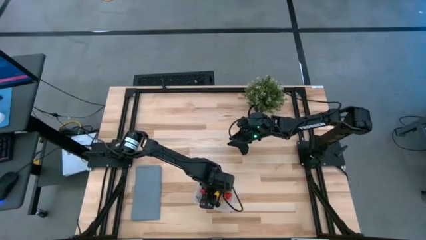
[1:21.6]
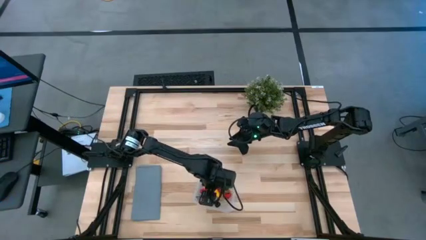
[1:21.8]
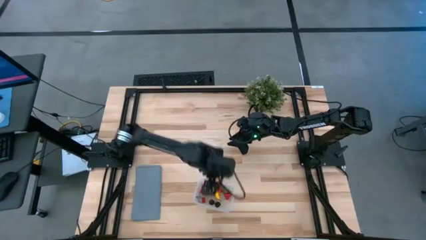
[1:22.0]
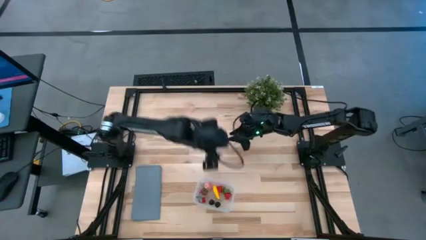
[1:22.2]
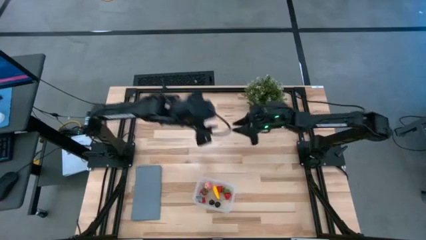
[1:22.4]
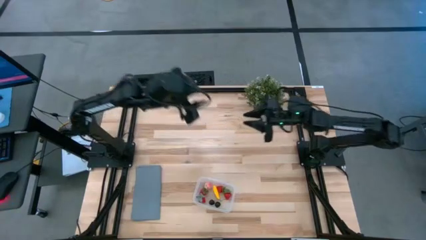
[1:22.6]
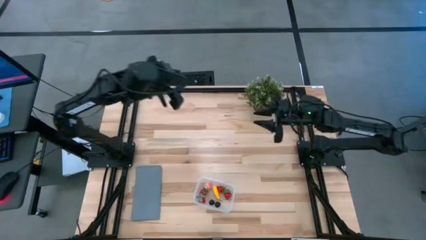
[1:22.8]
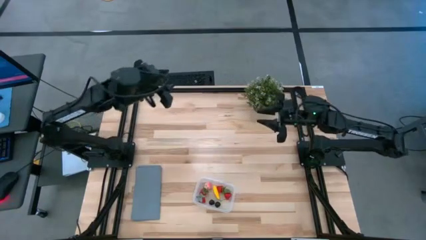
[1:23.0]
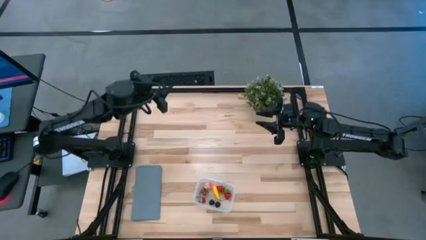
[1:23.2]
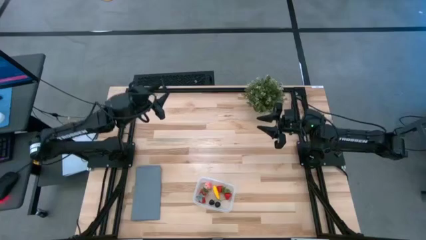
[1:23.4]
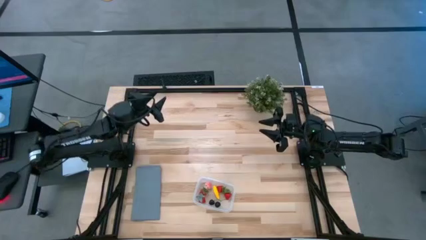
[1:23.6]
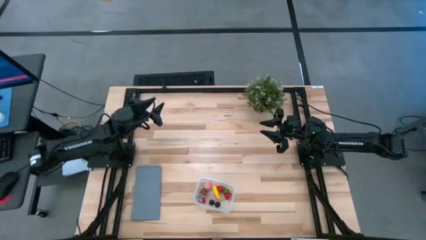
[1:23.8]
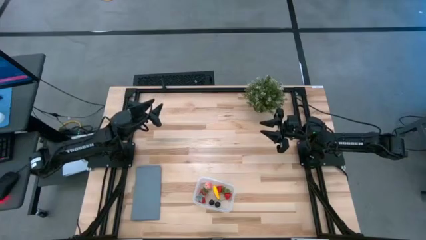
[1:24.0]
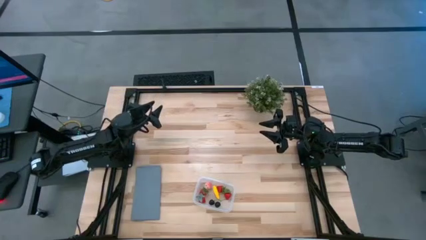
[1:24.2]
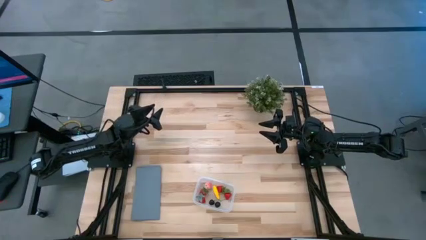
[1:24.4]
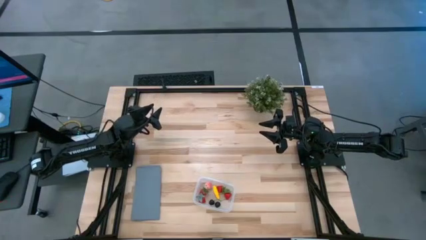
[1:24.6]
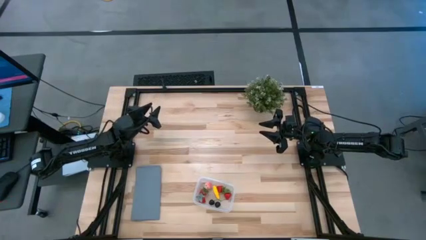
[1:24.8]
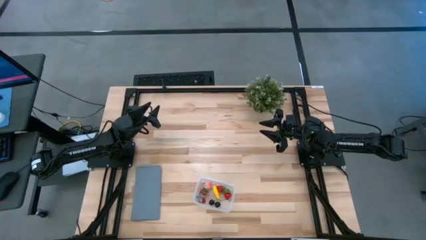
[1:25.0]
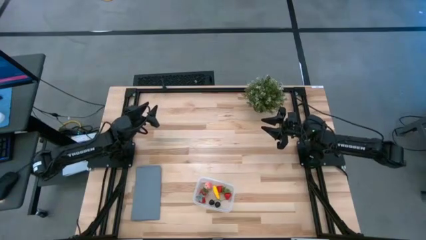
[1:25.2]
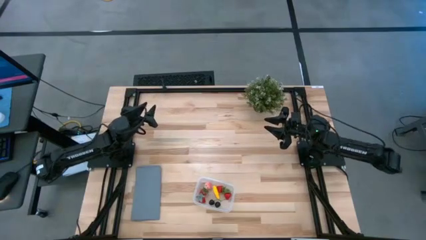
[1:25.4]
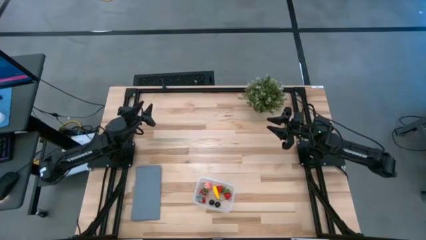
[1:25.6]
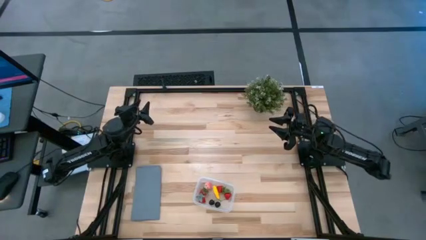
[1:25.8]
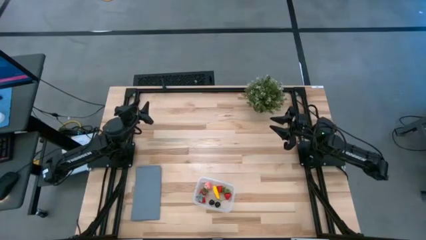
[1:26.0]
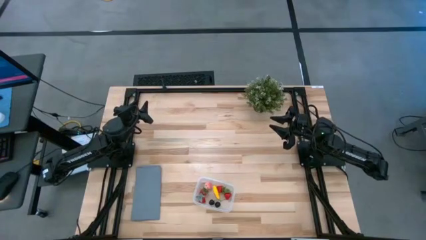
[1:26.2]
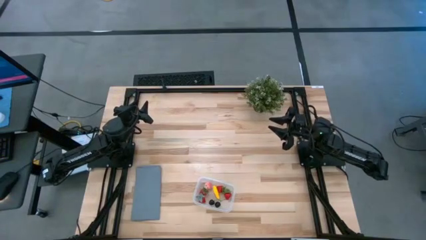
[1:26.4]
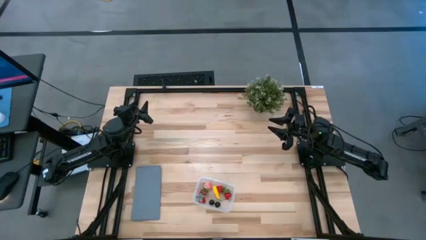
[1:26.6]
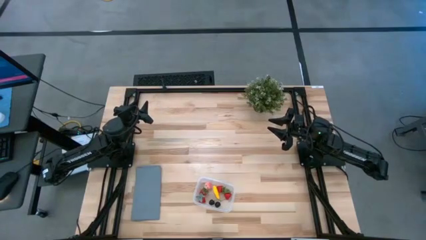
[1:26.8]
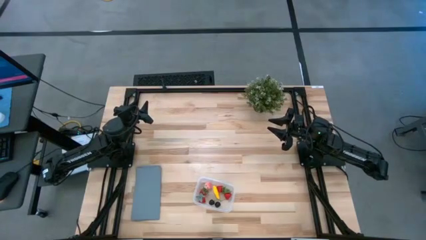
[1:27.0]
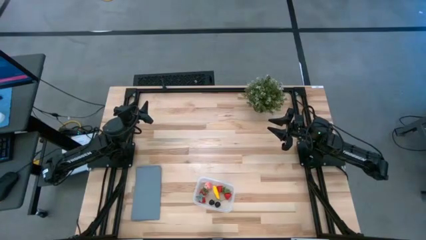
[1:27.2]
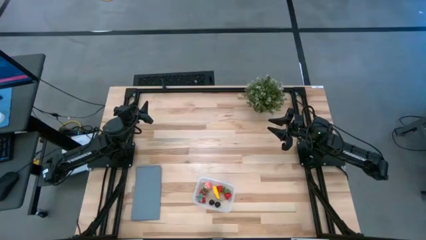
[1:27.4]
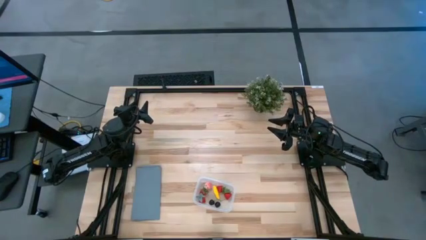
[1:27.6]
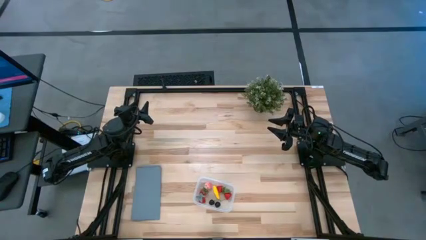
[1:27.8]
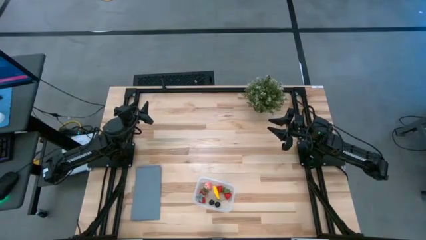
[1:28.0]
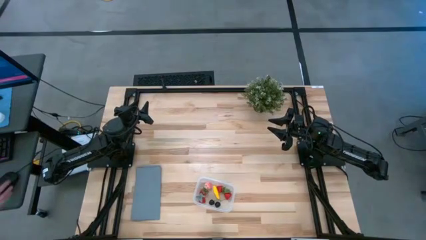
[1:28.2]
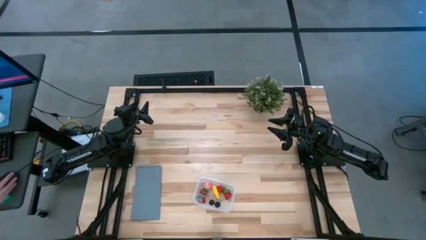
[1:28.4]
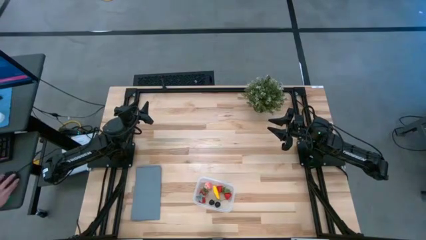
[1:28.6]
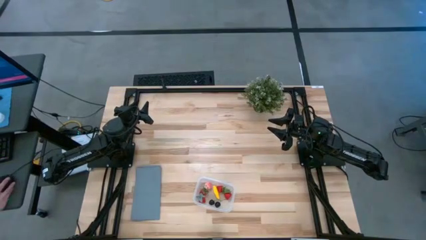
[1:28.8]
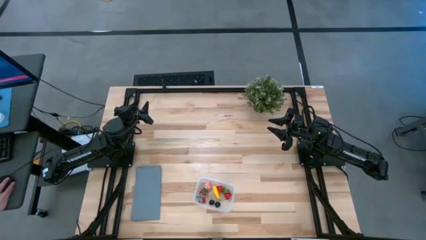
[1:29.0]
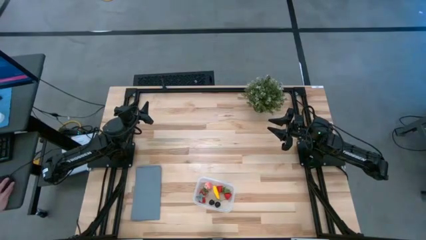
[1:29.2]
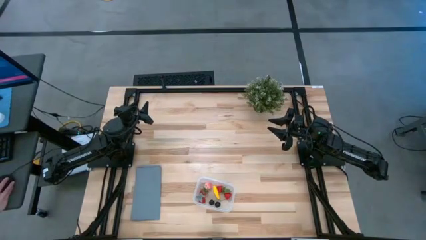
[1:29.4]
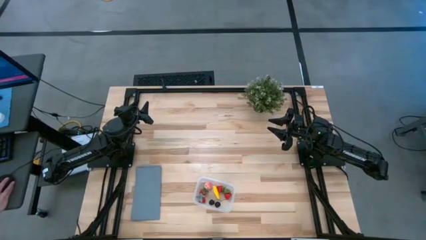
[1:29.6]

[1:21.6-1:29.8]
Task: Pick and placing Produce into tupperware
Return to Home Position

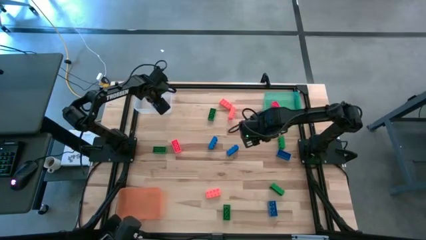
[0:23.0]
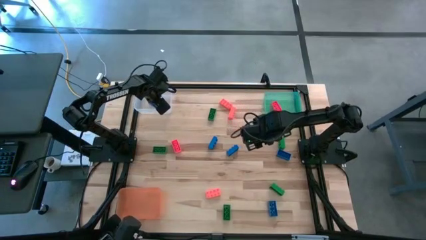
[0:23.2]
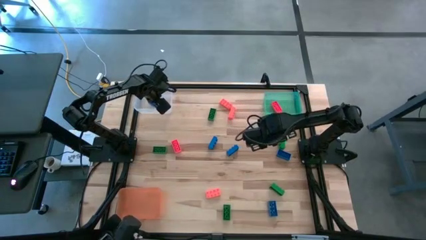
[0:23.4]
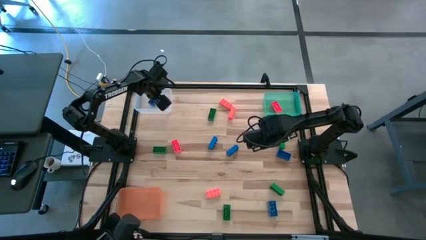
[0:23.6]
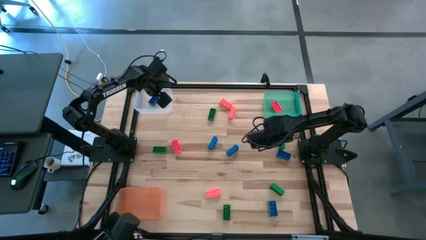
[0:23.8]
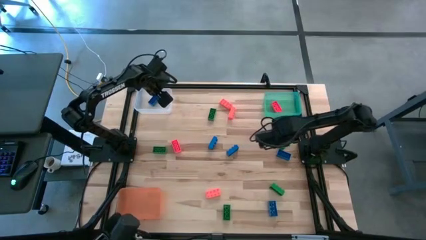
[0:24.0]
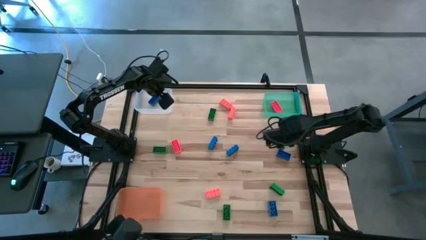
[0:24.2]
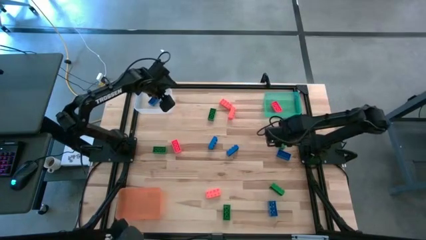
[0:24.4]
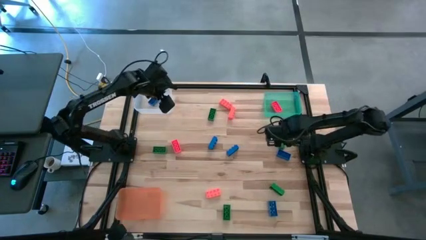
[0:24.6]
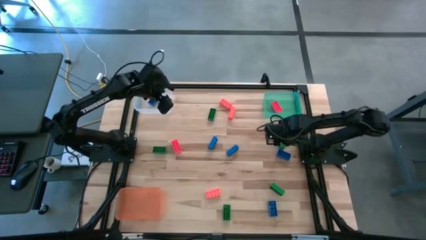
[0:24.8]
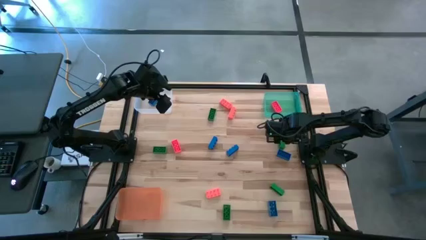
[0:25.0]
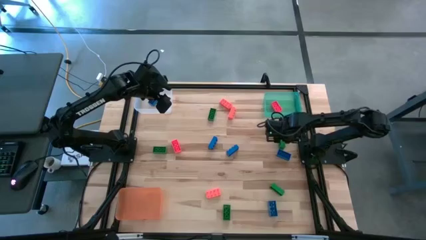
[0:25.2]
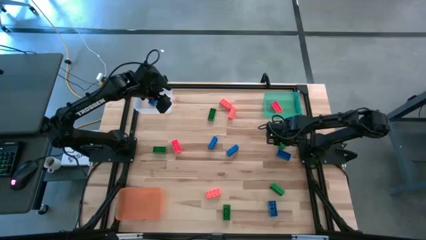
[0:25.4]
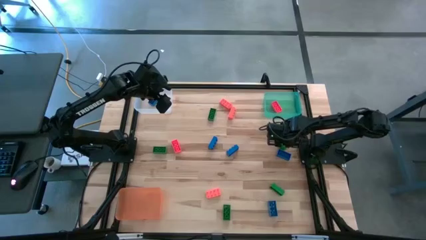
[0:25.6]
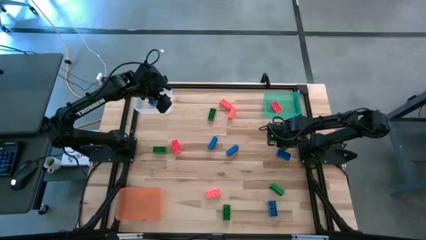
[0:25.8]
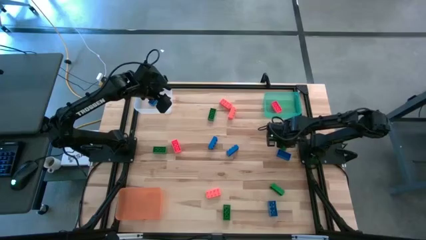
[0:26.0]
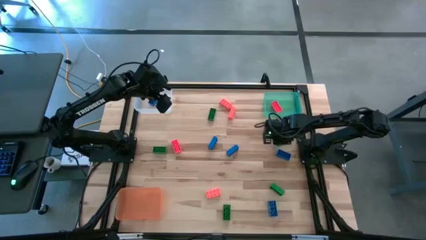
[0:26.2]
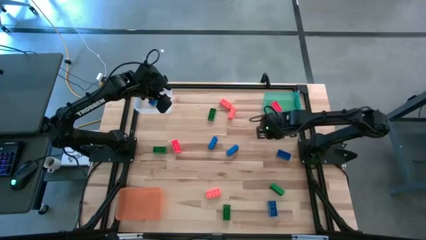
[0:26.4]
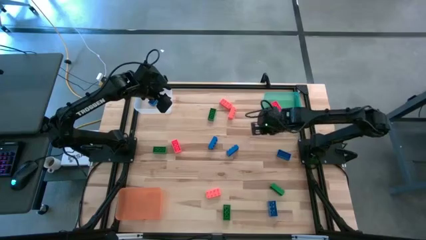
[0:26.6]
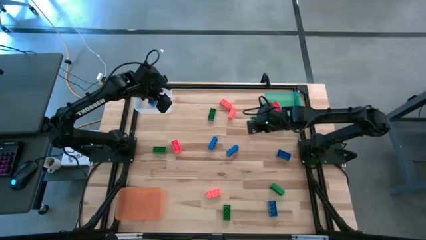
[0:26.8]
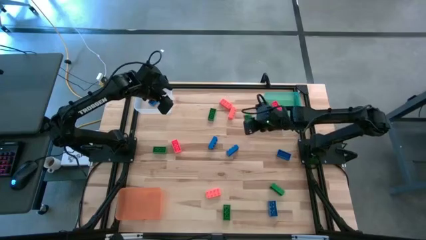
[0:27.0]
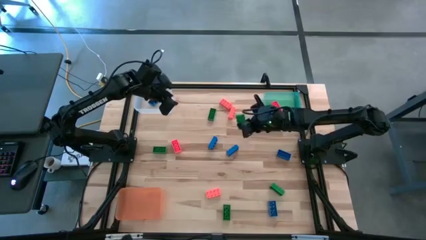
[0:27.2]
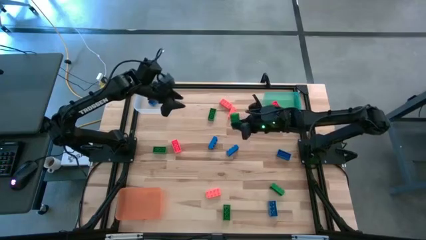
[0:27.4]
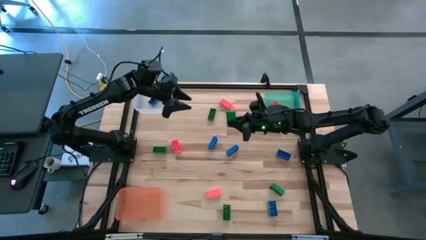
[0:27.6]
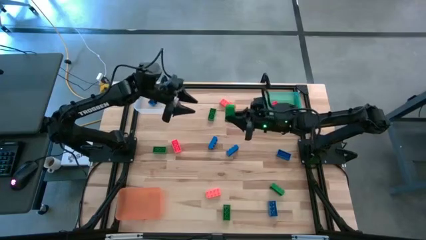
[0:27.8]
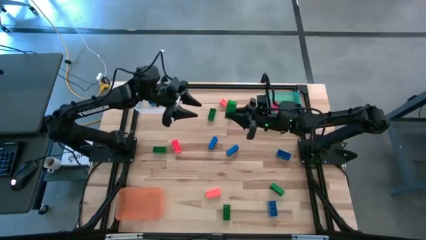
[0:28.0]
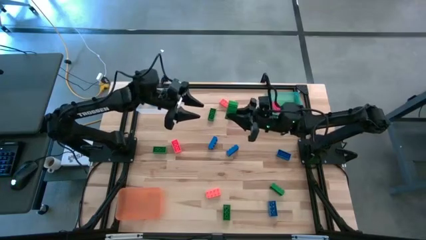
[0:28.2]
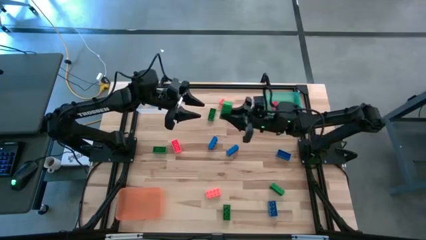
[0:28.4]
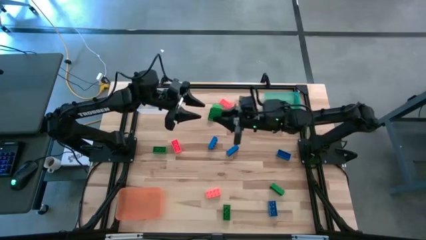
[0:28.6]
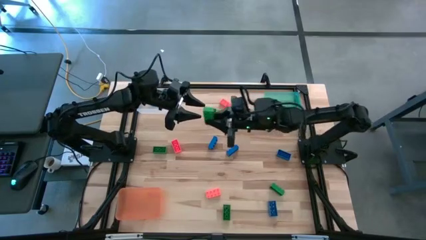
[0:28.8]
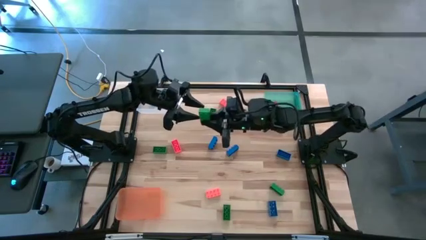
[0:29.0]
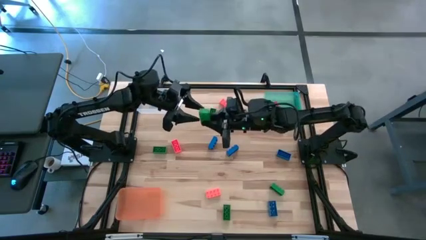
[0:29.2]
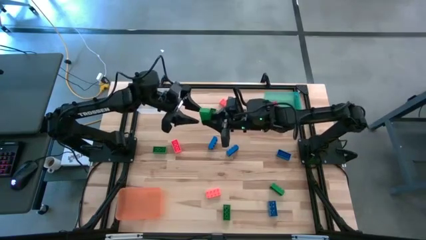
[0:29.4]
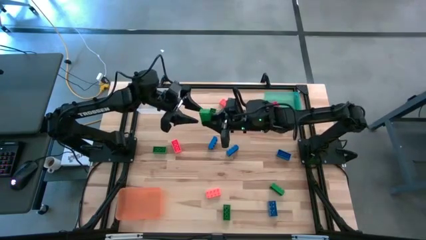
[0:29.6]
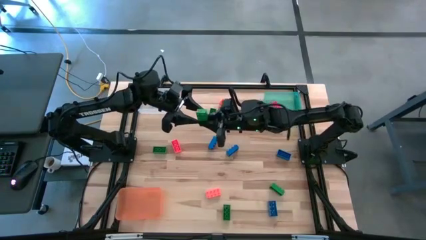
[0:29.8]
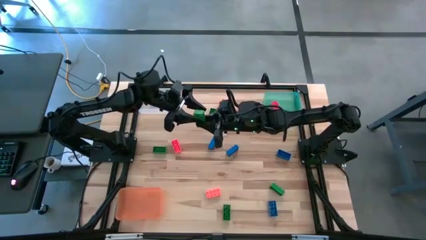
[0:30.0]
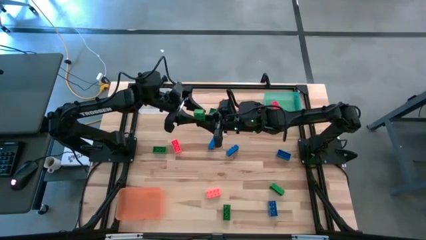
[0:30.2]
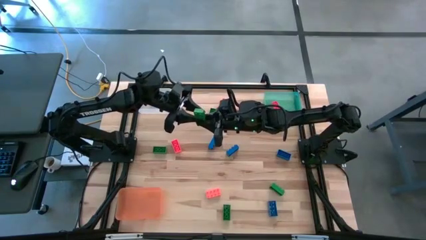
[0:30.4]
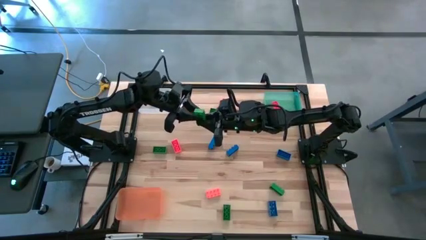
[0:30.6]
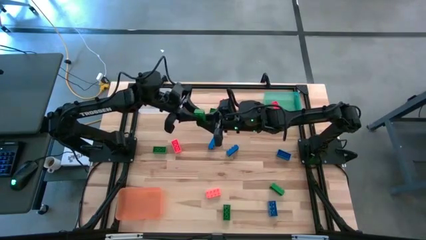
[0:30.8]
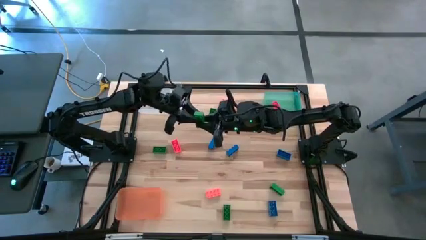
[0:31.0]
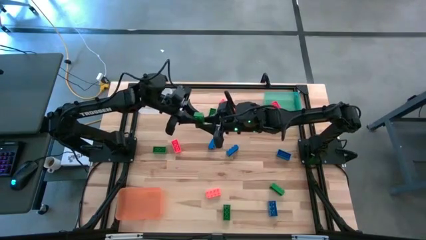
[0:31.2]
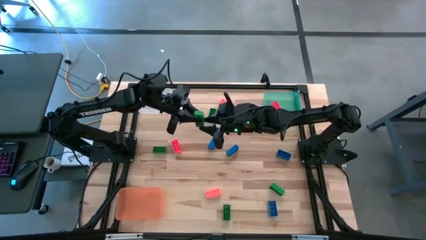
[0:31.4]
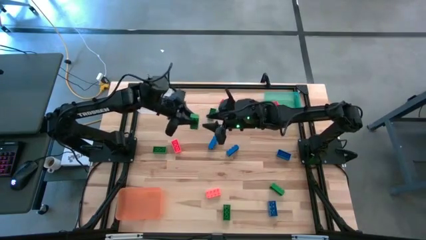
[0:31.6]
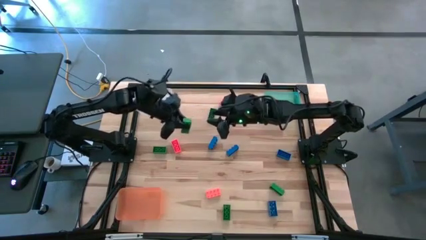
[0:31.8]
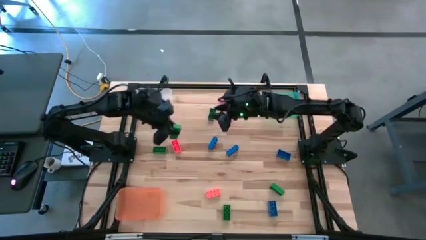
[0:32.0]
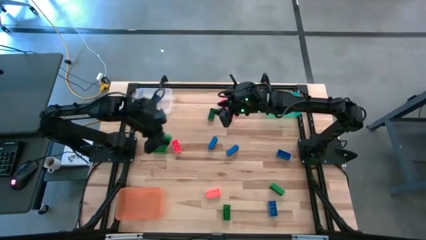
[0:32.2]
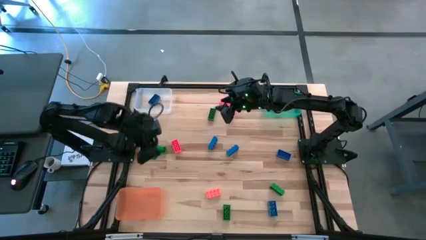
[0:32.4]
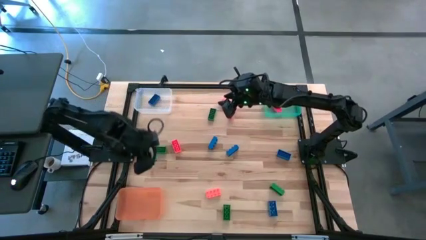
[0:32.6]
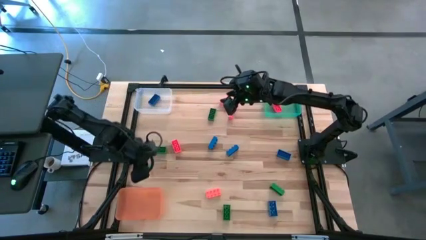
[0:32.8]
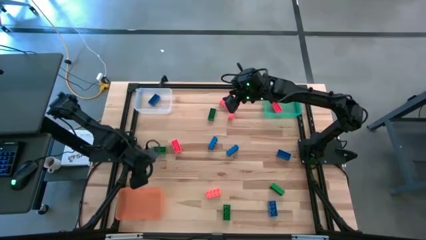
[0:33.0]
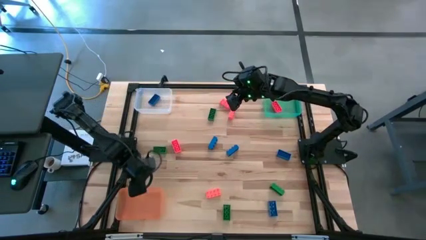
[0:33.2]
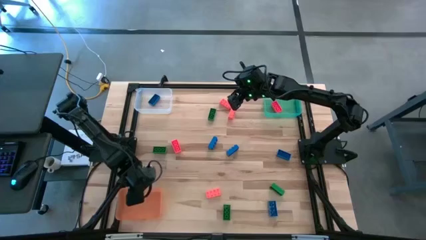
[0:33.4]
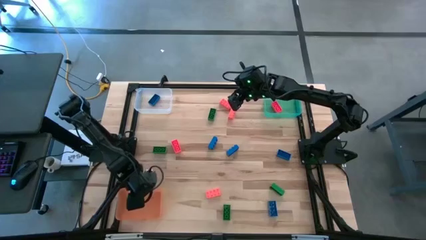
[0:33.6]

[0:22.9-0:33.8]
Task: Sort & place blocks by color
Put the green game piece into the orange bin
